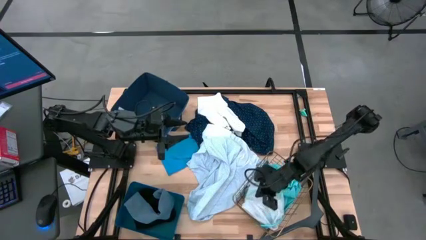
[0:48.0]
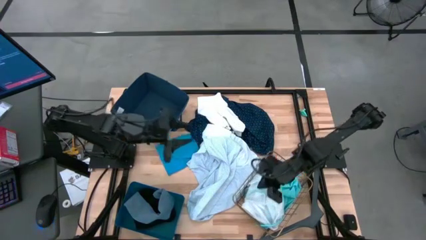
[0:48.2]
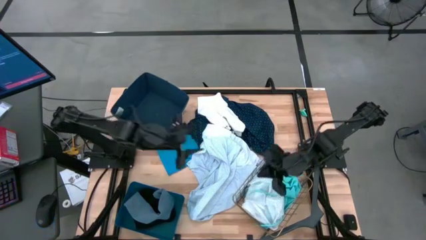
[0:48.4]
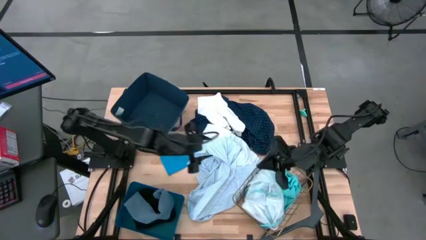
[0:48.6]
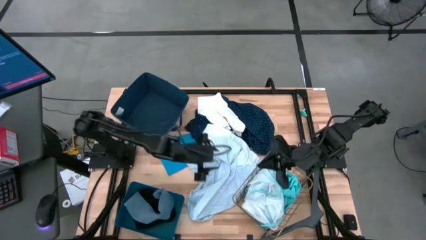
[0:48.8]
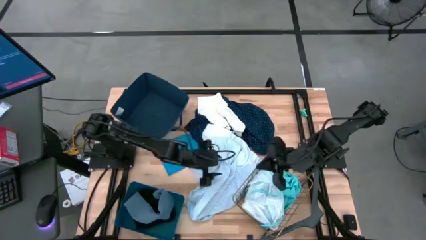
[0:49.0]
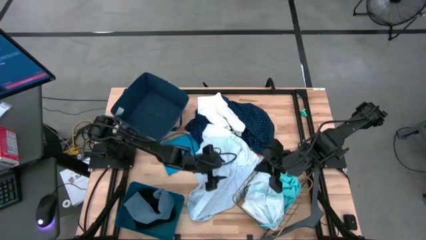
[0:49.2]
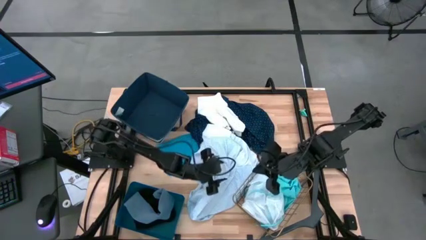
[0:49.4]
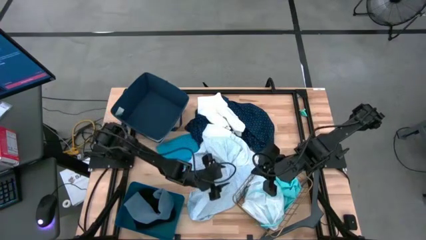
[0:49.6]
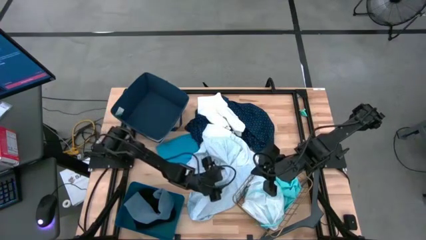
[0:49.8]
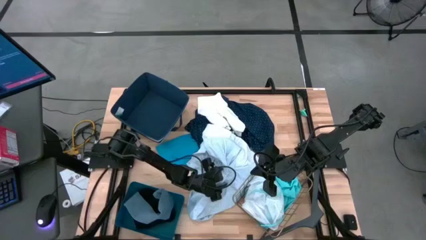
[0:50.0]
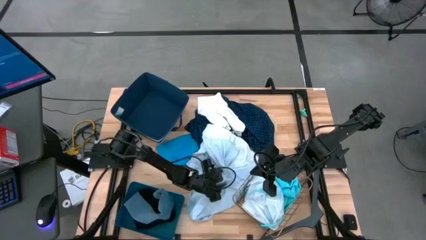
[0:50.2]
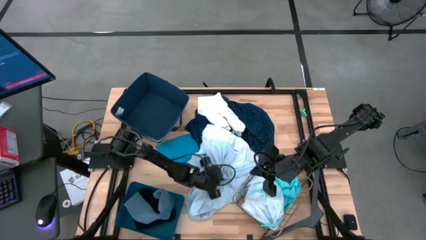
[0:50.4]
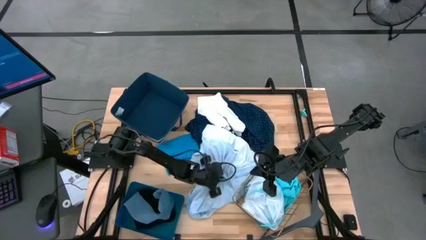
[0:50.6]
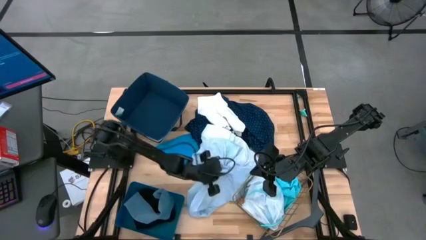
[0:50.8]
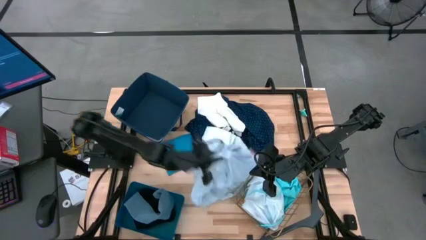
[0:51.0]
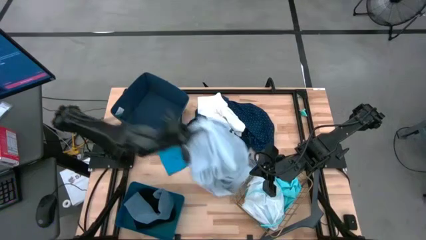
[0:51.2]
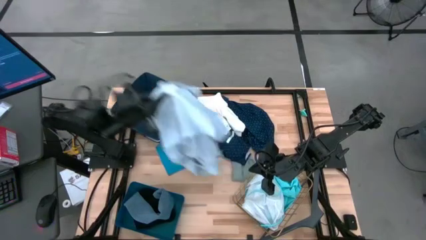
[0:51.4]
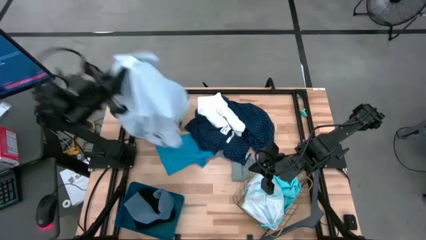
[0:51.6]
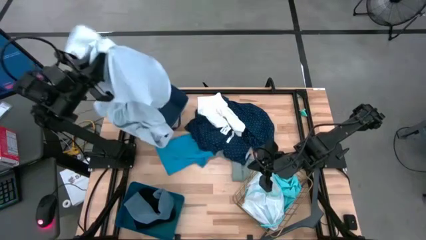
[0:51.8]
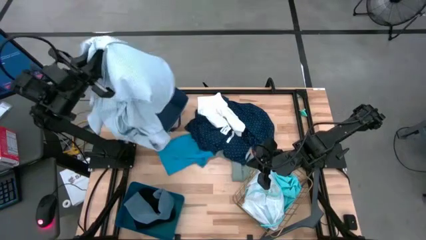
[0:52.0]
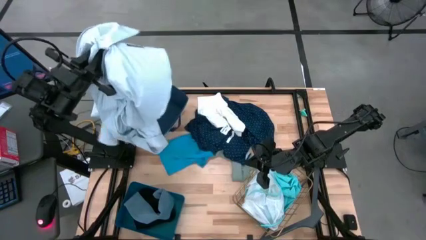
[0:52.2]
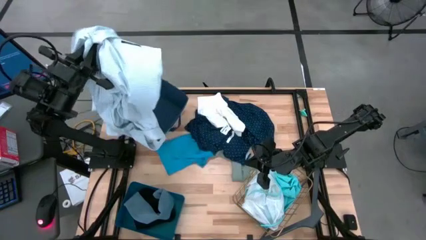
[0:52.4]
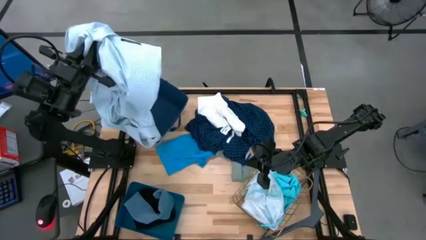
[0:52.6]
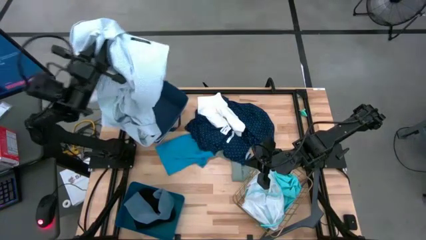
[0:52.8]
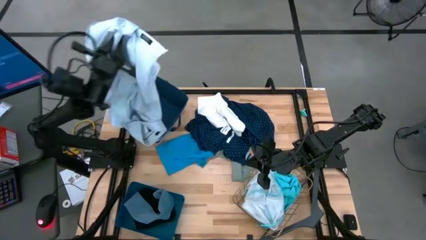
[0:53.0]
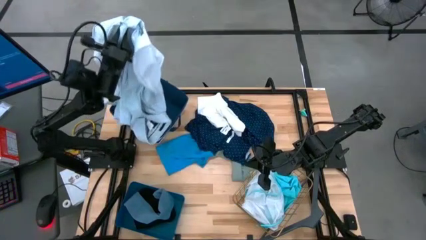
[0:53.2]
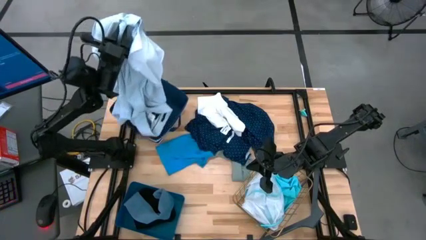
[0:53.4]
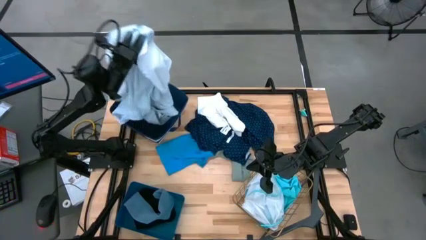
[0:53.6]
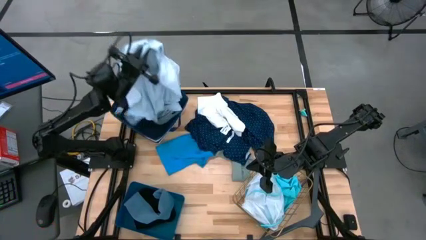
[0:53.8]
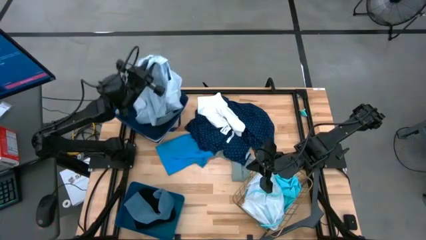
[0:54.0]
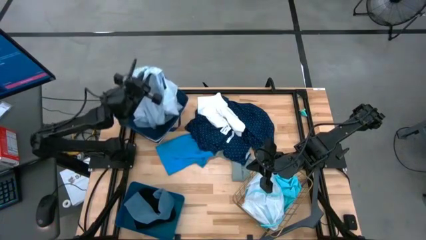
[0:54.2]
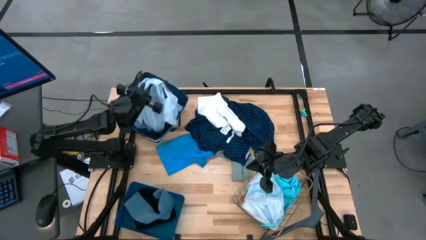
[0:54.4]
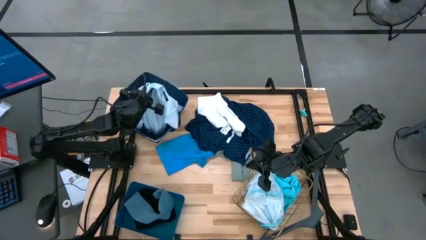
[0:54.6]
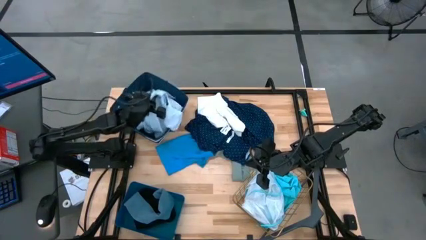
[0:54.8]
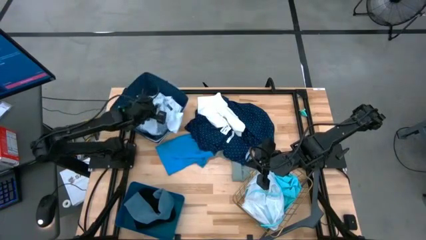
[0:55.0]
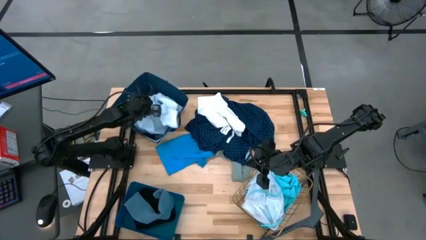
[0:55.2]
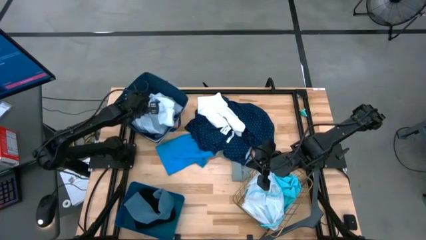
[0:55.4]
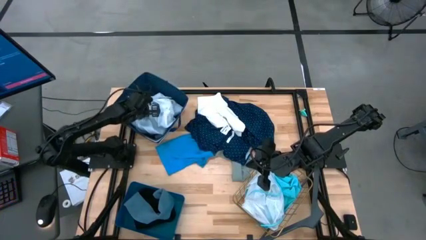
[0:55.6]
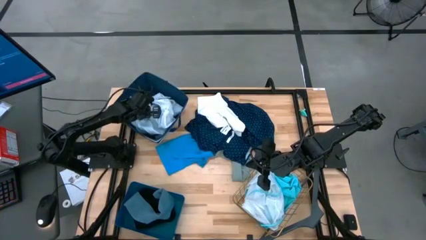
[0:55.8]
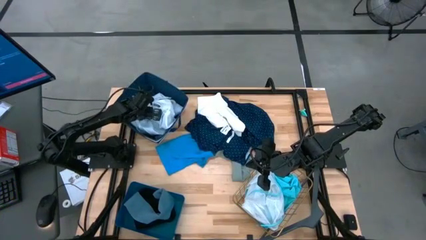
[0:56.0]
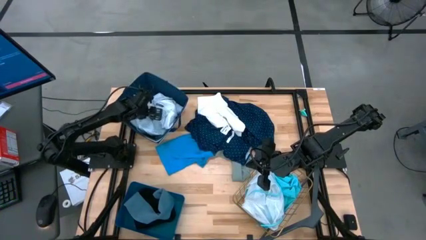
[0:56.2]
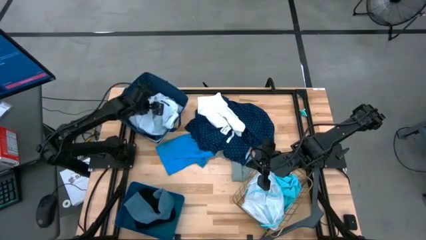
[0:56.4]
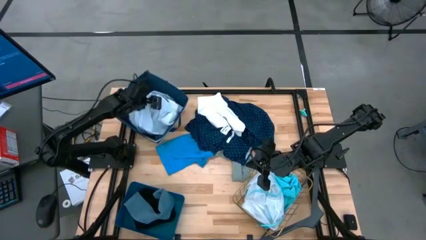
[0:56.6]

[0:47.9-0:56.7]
Task: Pick & Place Cloths
Put the light blue shirt into the blue bin

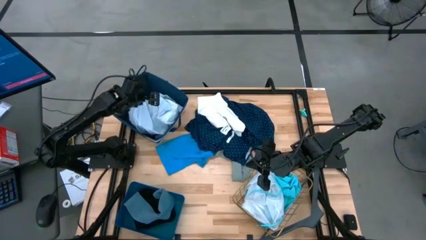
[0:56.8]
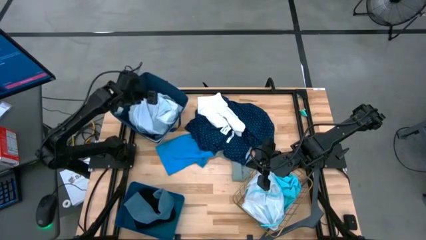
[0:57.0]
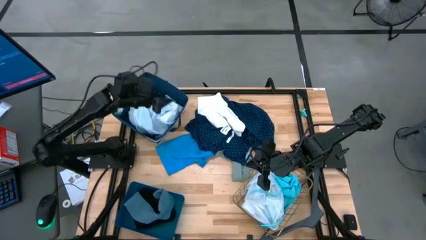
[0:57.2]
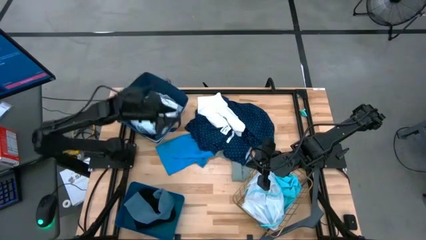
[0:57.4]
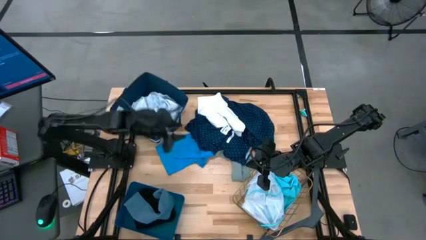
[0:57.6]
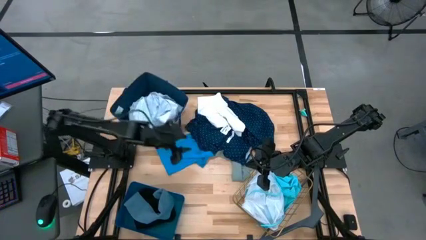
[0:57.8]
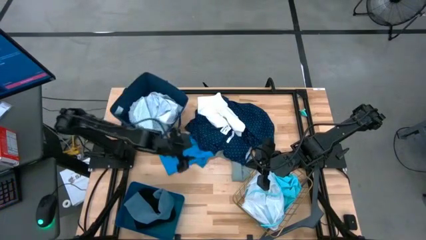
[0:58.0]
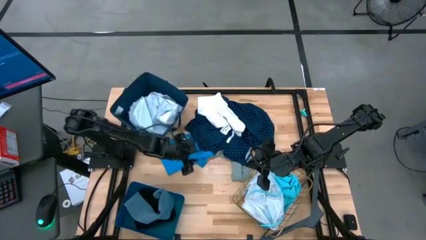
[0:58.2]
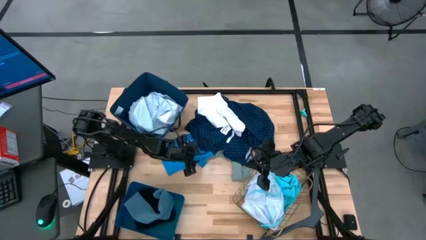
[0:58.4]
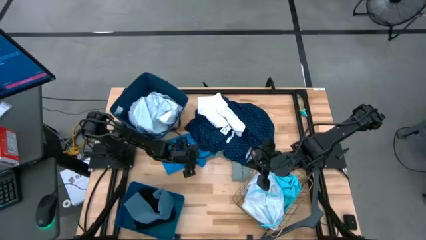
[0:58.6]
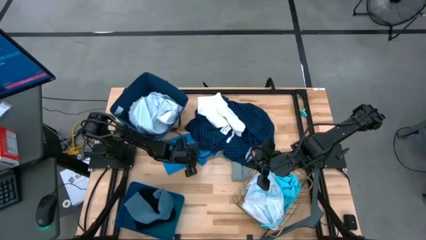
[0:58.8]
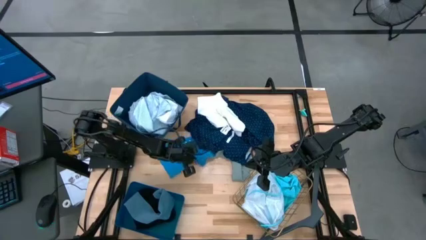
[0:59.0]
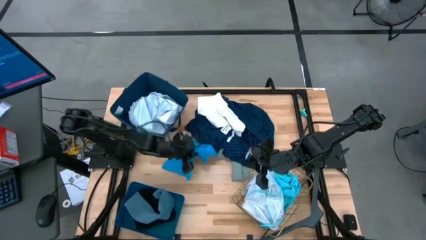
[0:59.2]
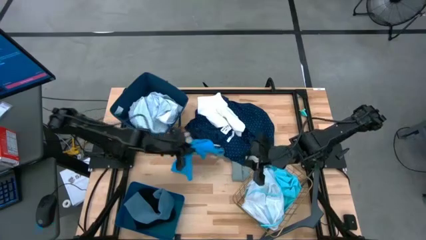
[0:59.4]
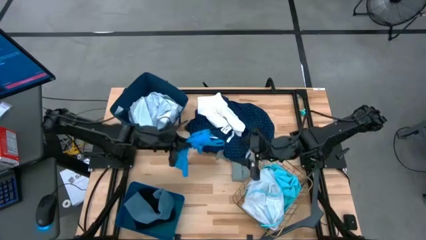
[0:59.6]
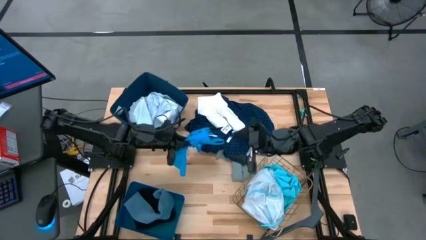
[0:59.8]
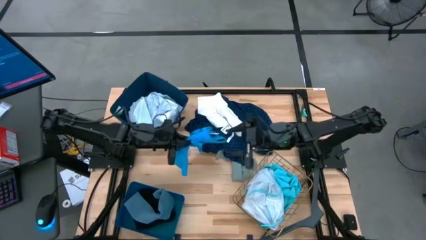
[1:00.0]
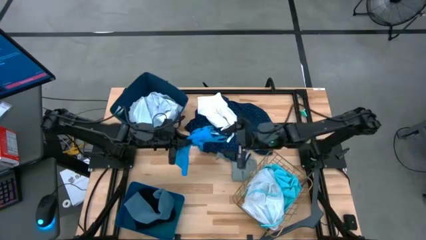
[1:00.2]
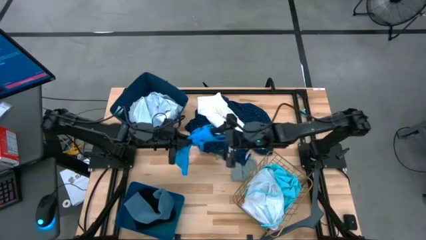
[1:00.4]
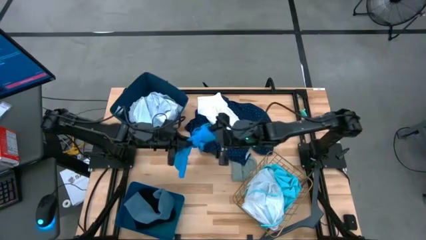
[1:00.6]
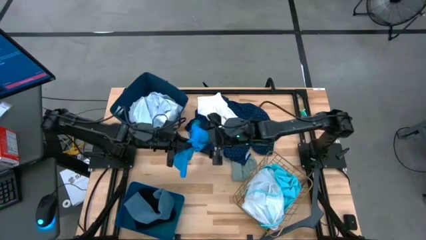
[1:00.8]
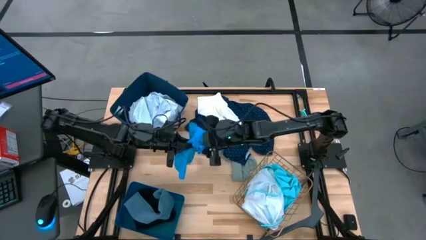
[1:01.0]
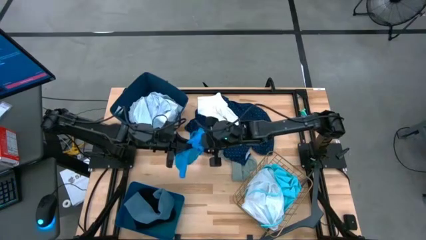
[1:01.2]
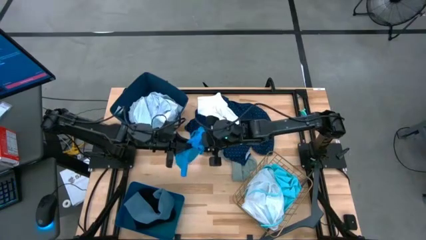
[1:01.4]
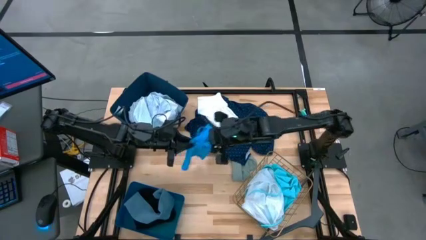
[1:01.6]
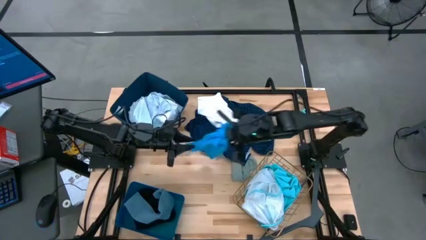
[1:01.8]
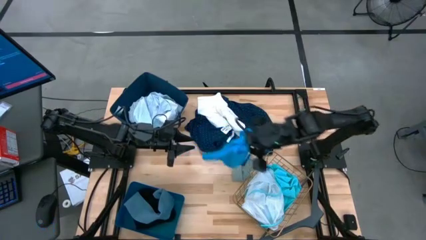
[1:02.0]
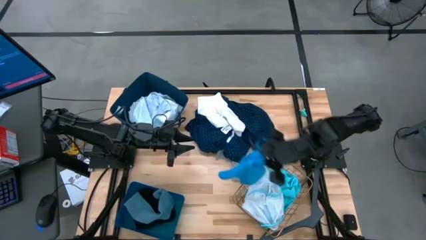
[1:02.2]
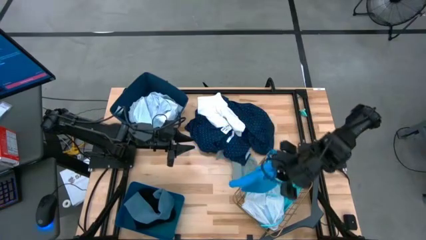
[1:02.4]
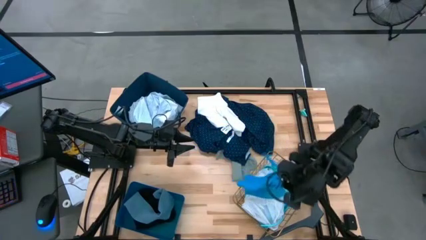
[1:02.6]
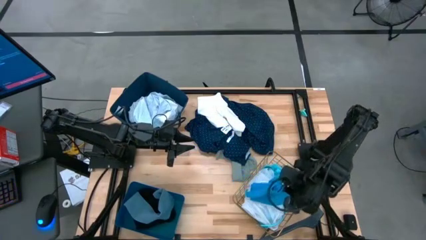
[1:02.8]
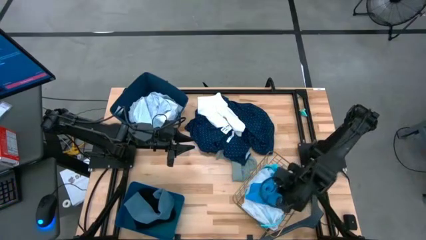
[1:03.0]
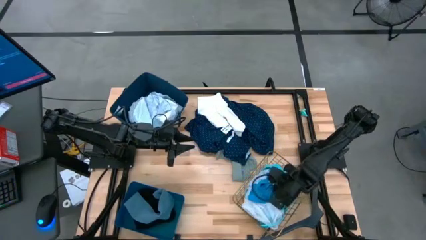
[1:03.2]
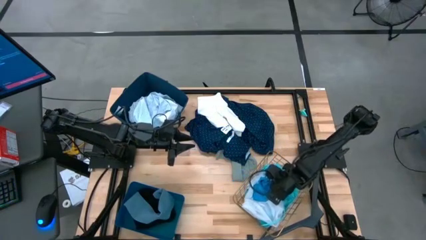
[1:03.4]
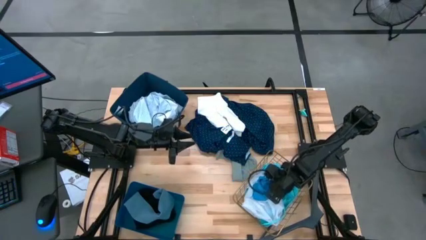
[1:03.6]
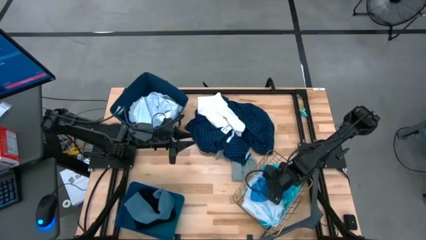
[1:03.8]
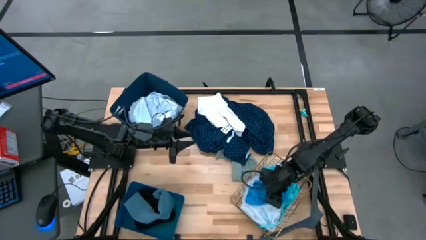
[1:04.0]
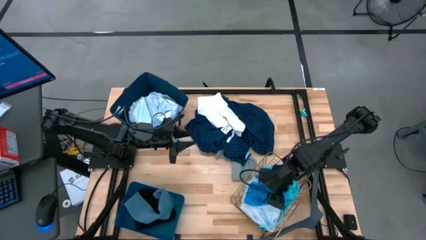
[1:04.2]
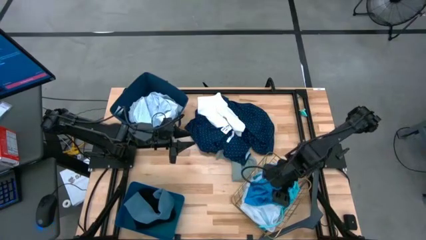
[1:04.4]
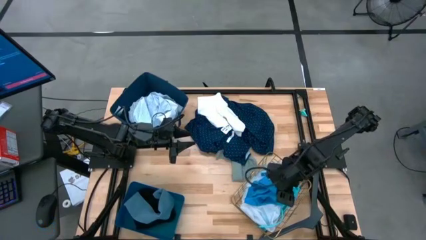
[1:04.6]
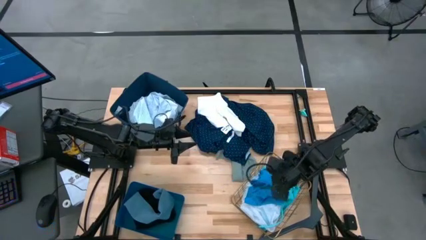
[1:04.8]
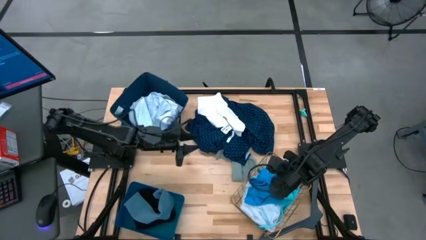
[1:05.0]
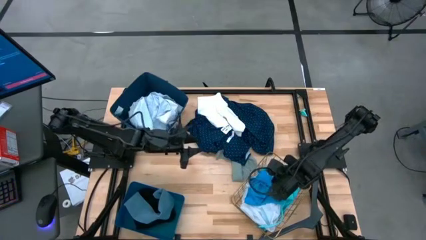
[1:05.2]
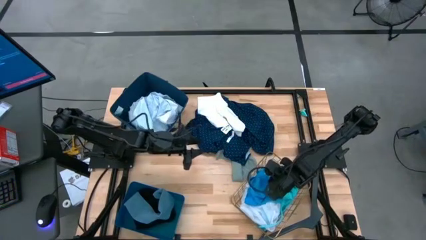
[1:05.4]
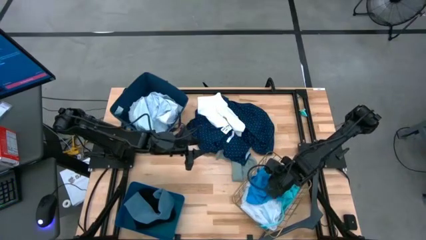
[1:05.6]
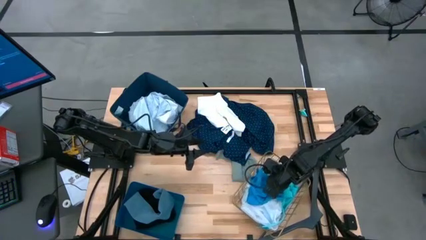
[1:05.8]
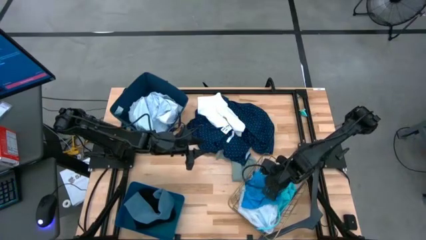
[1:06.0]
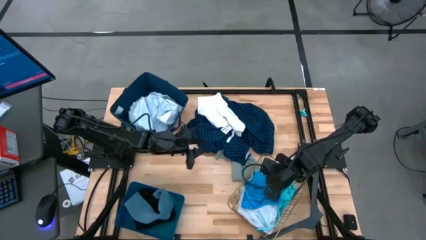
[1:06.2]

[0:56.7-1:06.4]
Put the blue shorts into the gold basket
